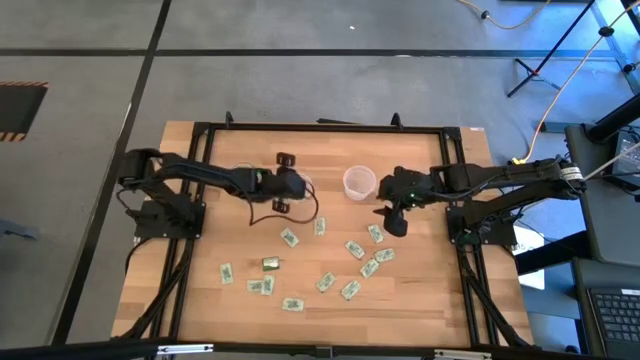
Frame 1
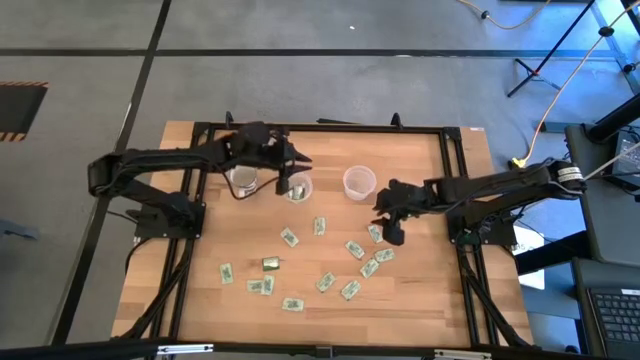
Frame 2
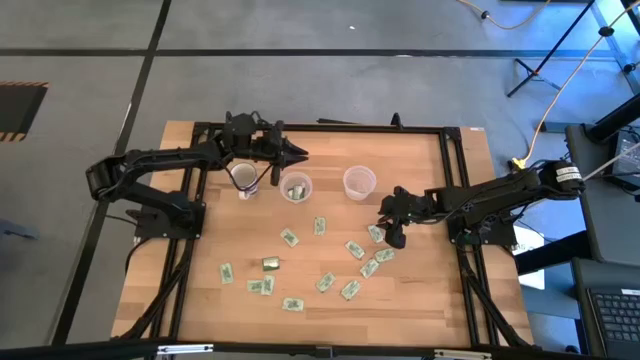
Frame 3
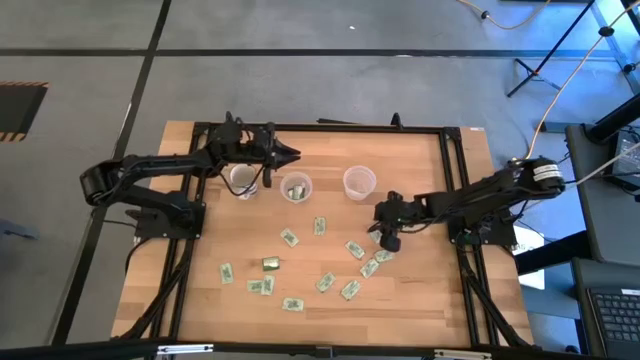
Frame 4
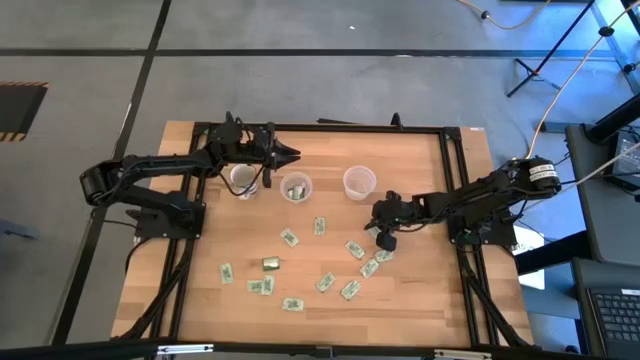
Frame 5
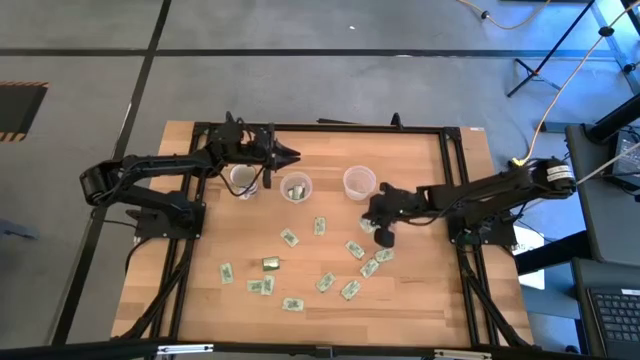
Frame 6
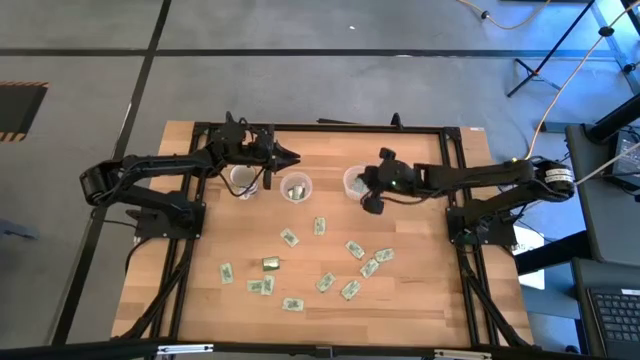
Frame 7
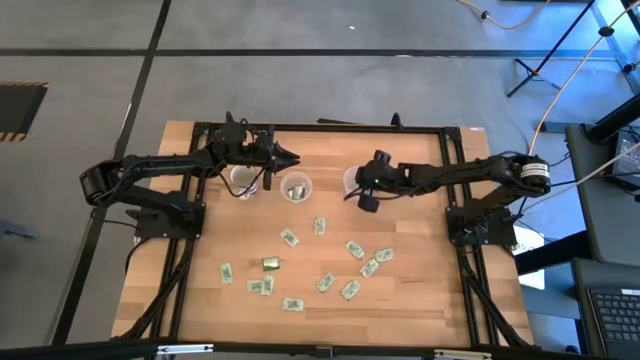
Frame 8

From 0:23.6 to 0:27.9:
Task: Pick and place items into bin
Put the white stevia packet into the right transparent bin

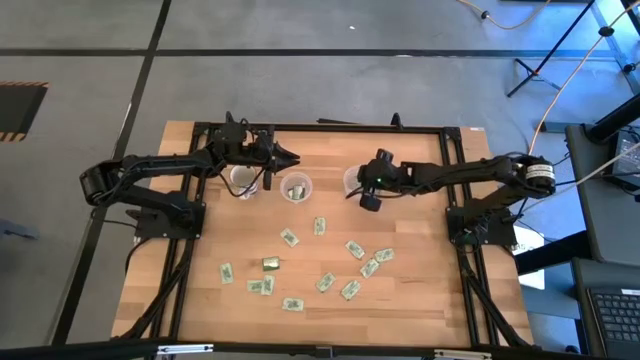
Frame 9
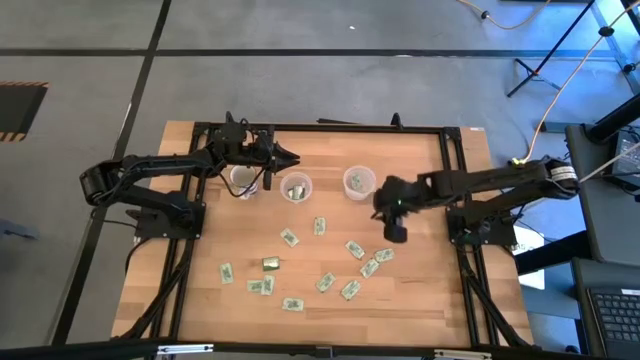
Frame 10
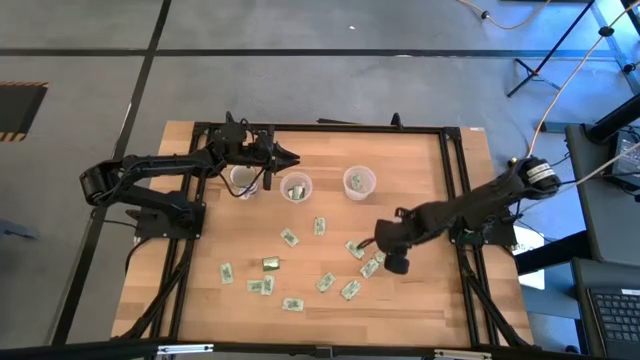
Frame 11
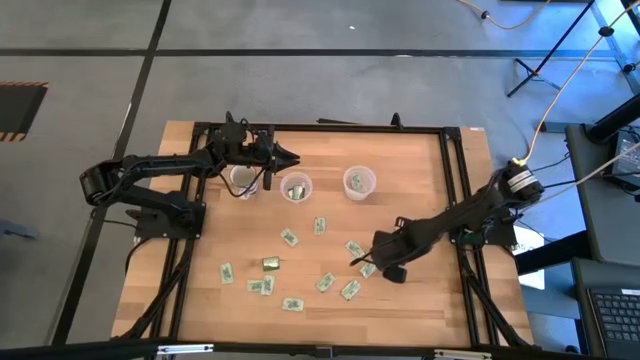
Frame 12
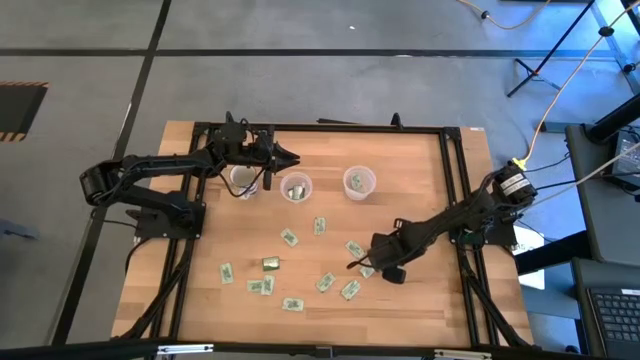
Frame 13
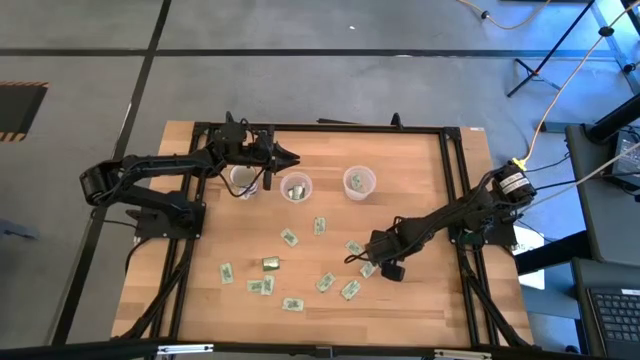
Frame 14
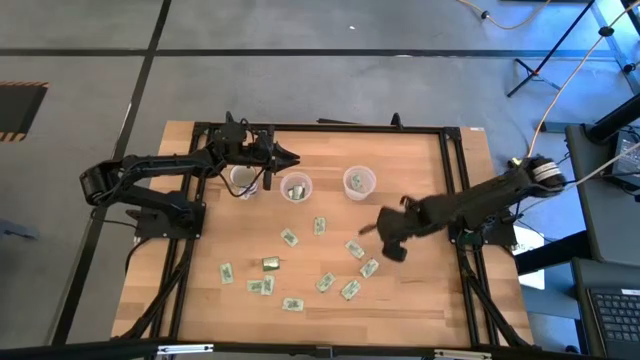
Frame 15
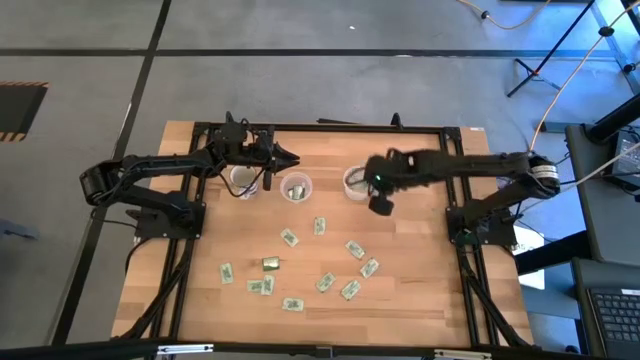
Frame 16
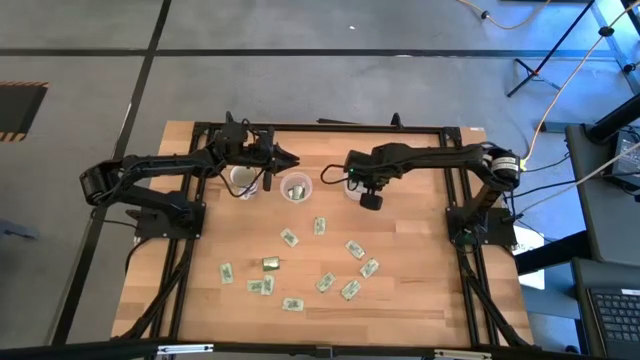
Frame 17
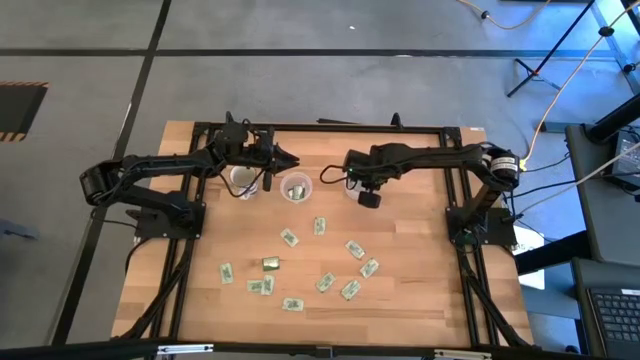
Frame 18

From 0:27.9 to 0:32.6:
Put the white stevia packet into the right transparent bin

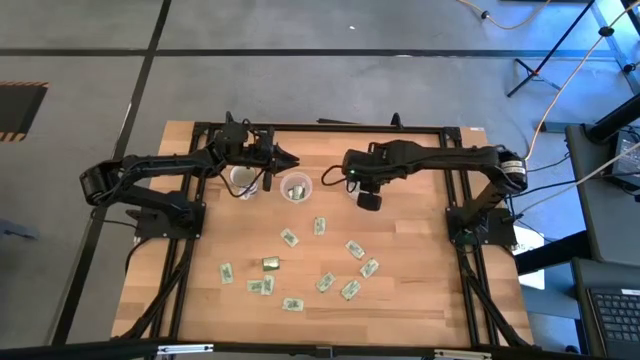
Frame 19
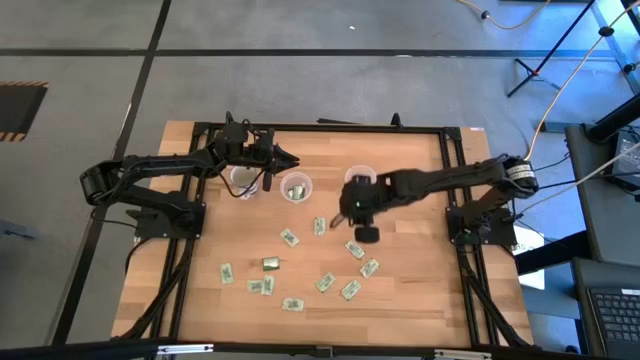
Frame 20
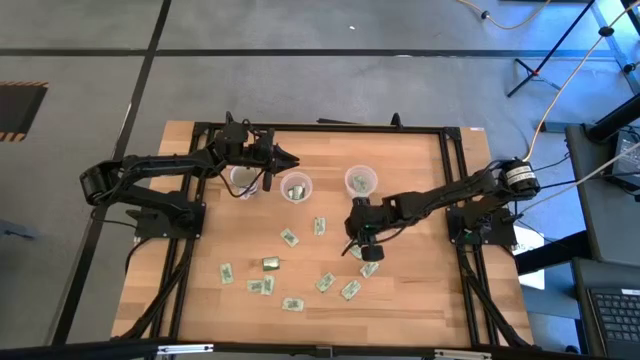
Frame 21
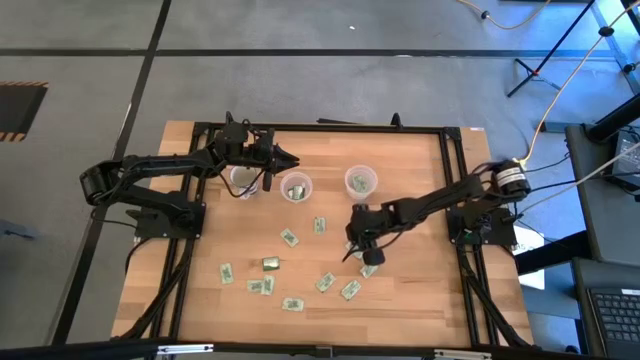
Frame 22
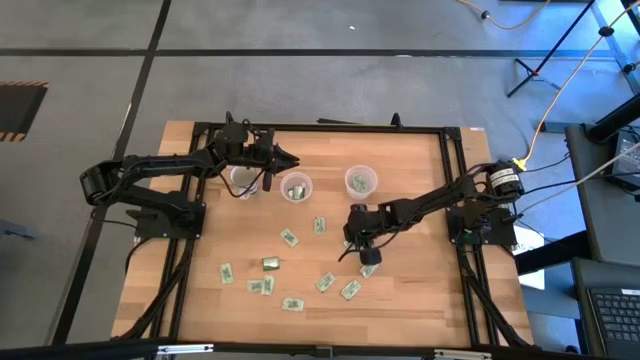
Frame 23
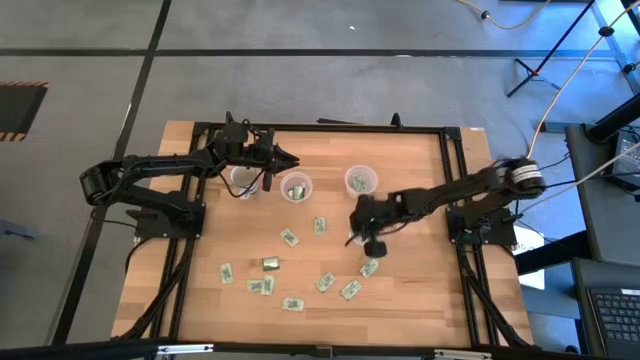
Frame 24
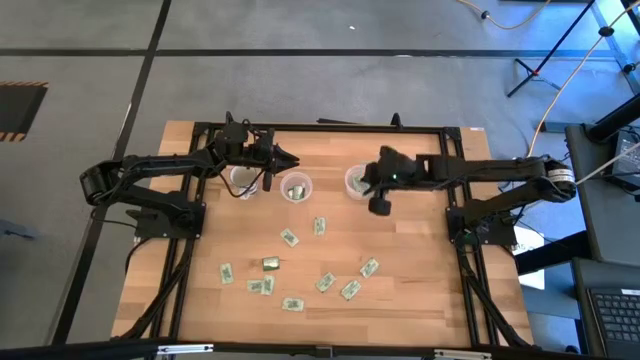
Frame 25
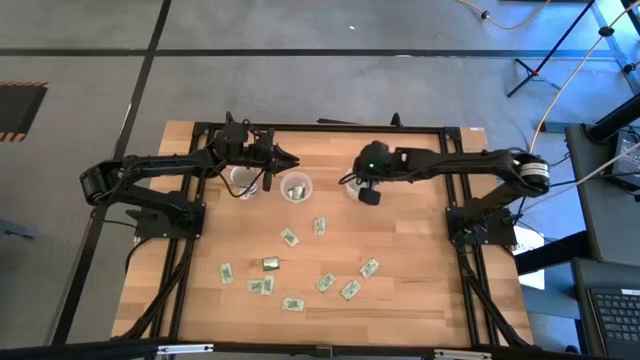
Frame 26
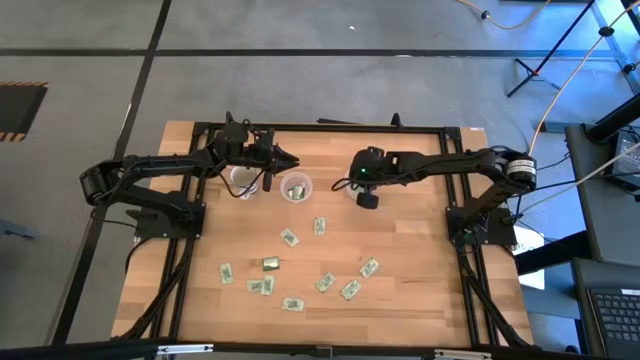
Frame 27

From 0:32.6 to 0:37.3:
Put the white stevia packet in the right transparent container

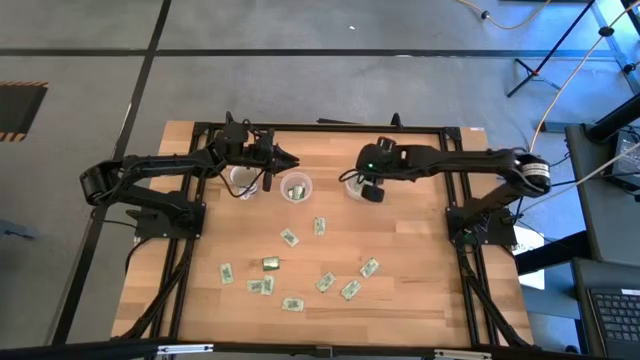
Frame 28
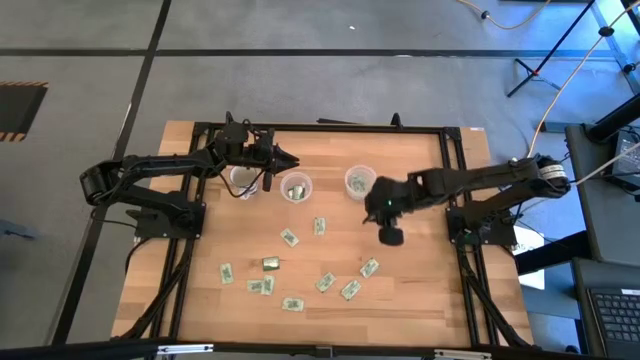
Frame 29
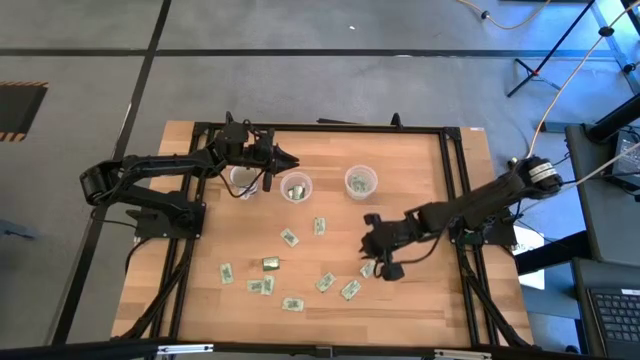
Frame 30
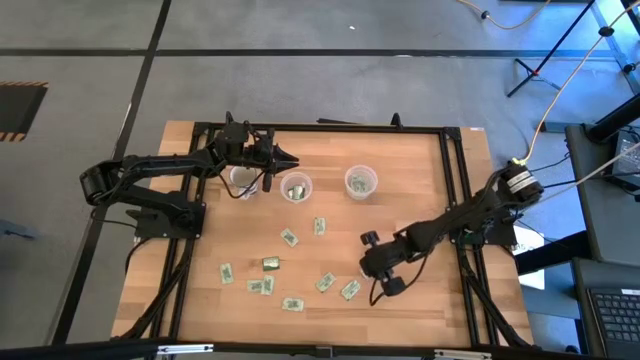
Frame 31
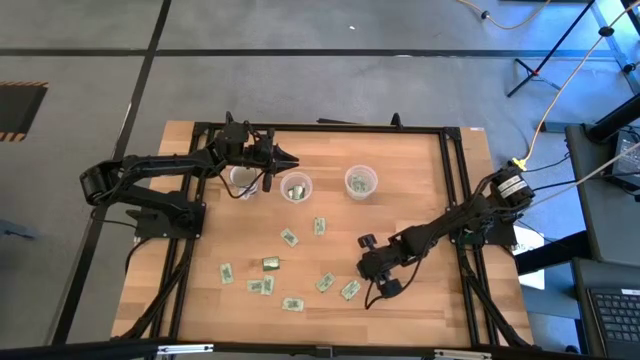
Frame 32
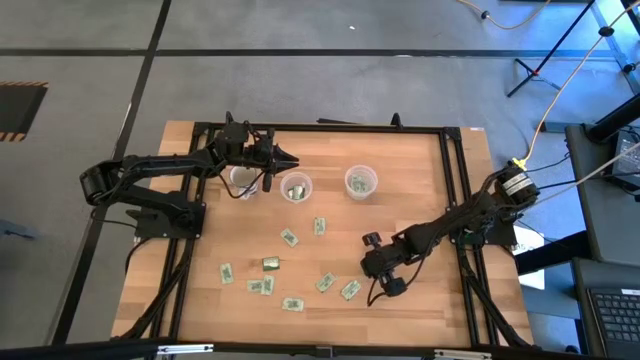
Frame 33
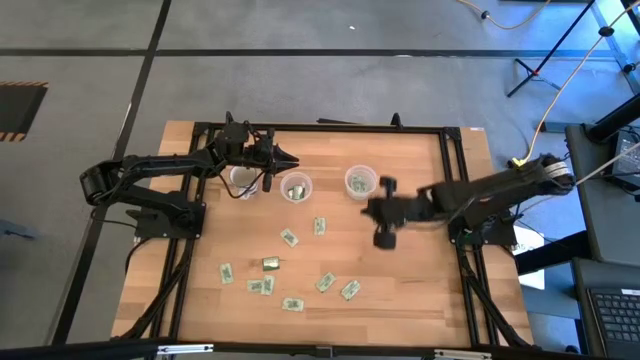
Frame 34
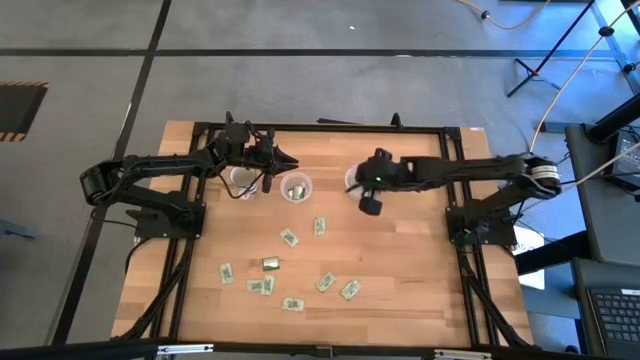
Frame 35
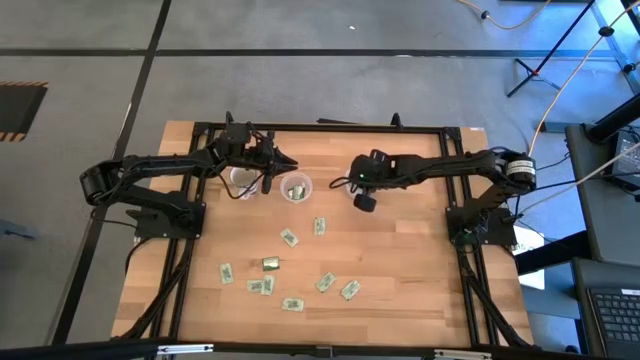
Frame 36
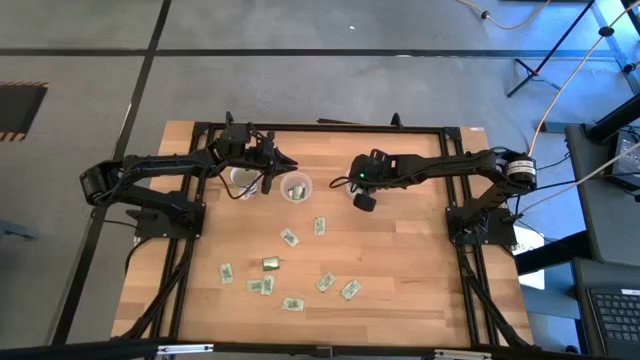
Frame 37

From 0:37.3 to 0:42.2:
Put the white stevia packet into the right transparent bin

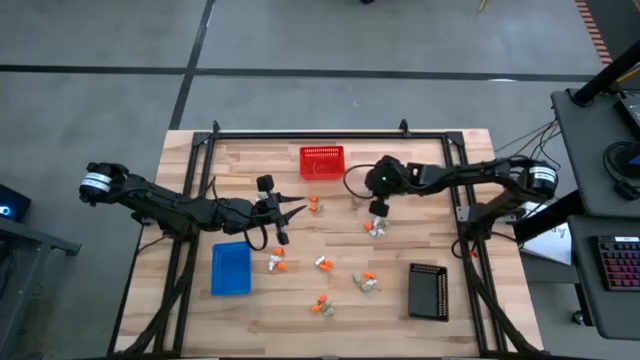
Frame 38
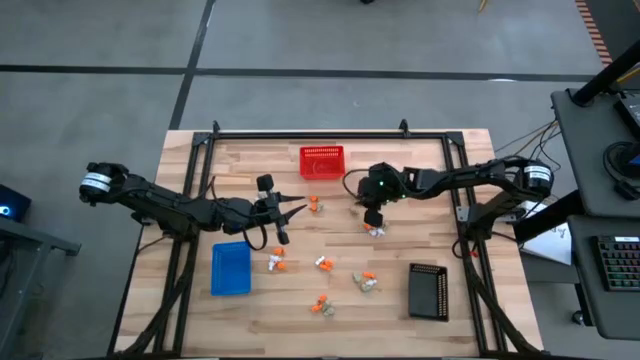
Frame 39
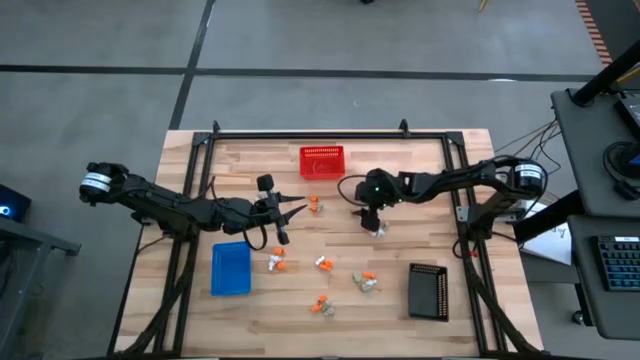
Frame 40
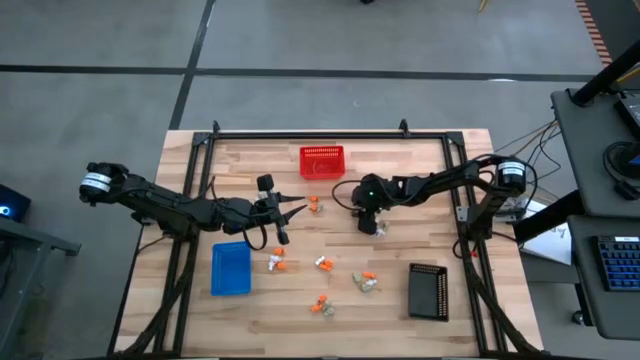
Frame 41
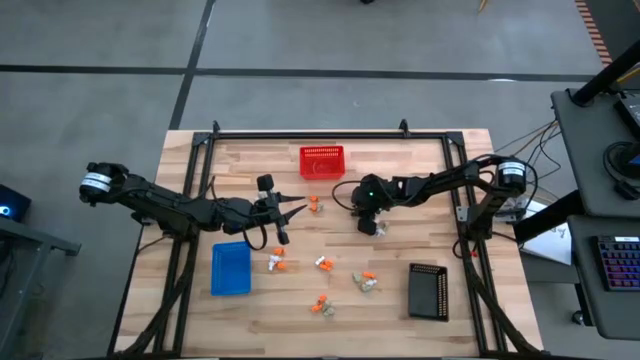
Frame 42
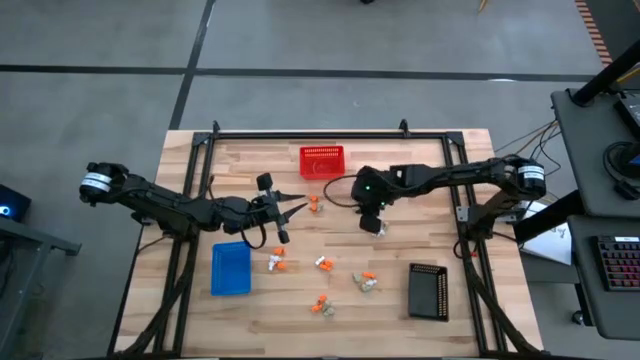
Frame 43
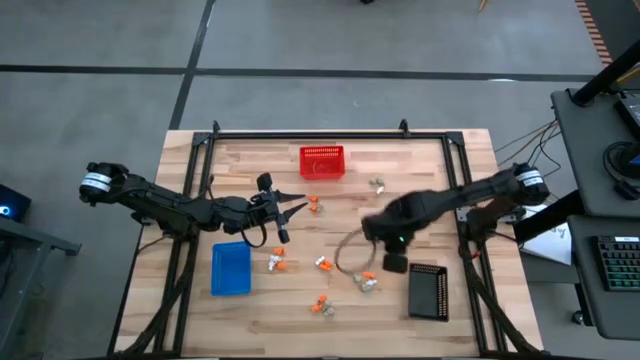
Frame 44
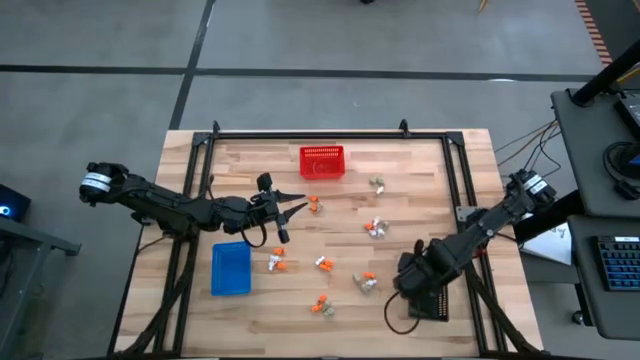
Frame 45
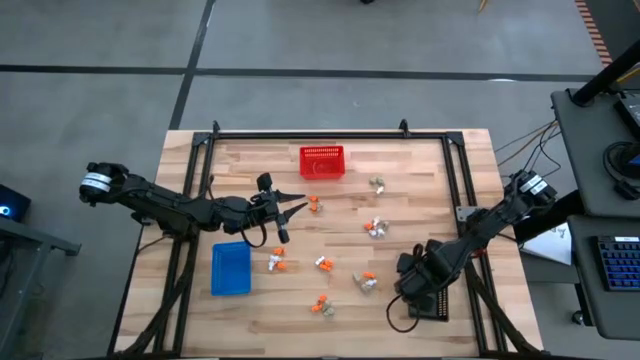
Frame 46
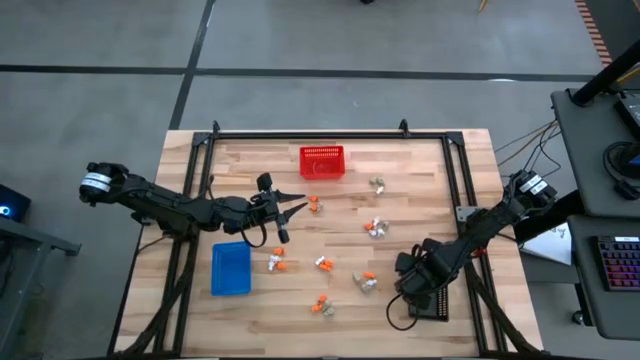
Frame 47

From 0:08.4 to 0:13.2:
Task: Sort Halloween decoration
Put the gray skull toy into the black bin
